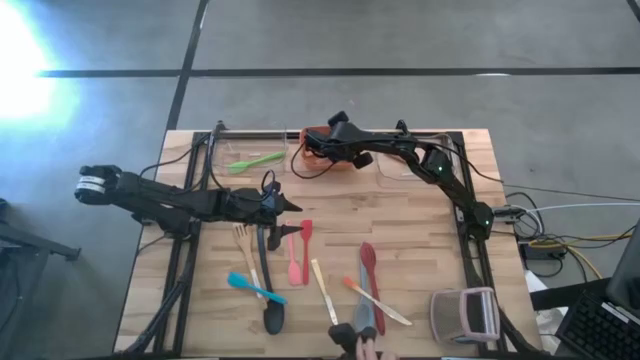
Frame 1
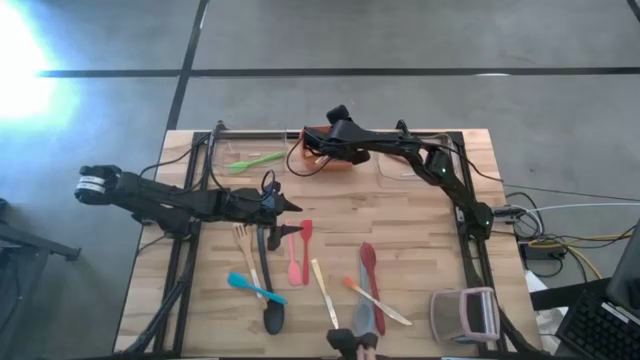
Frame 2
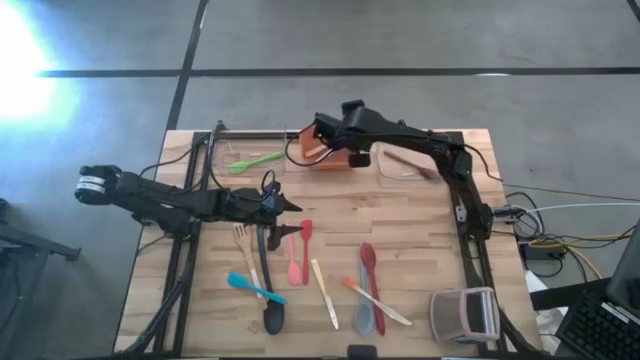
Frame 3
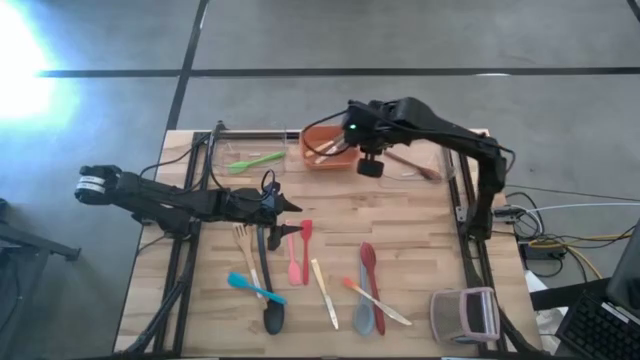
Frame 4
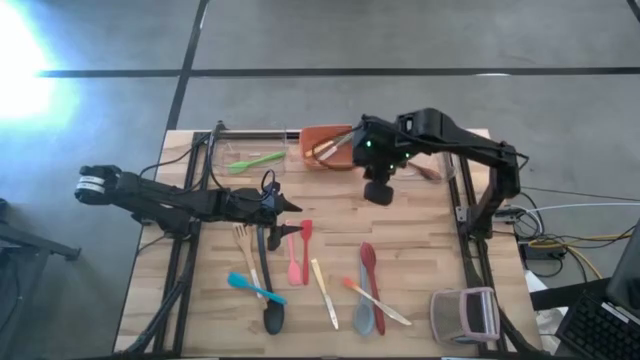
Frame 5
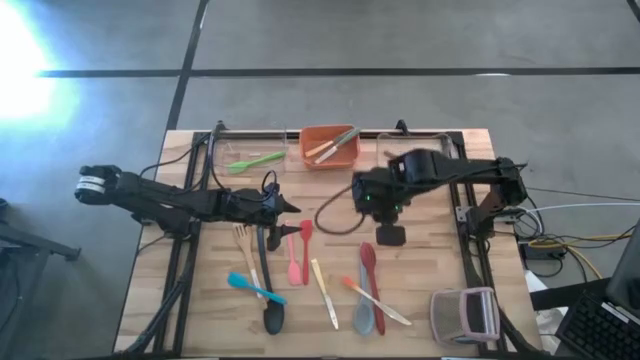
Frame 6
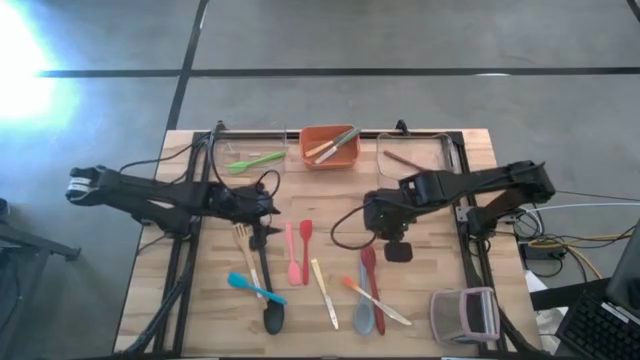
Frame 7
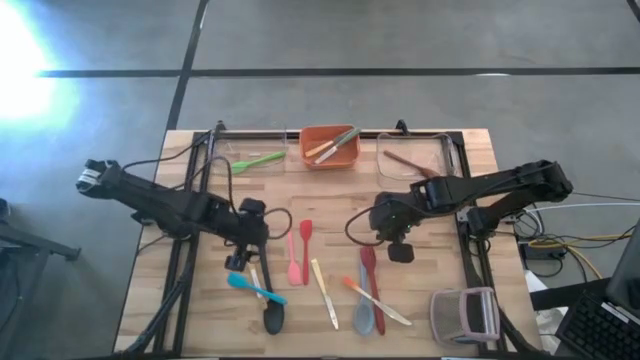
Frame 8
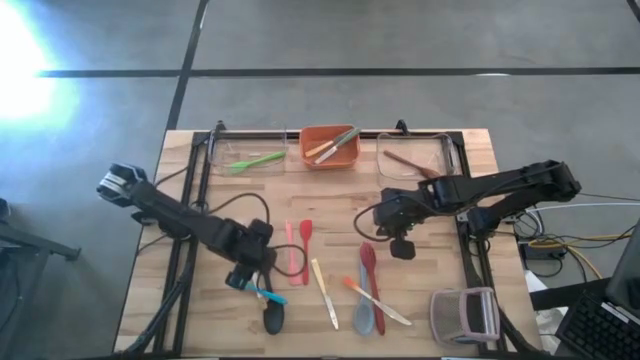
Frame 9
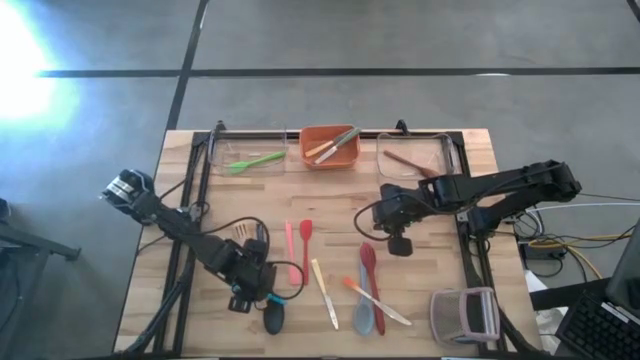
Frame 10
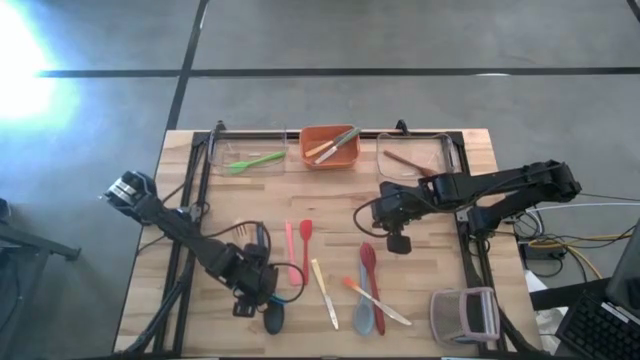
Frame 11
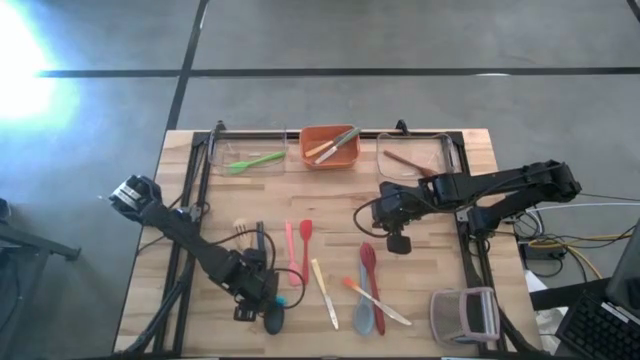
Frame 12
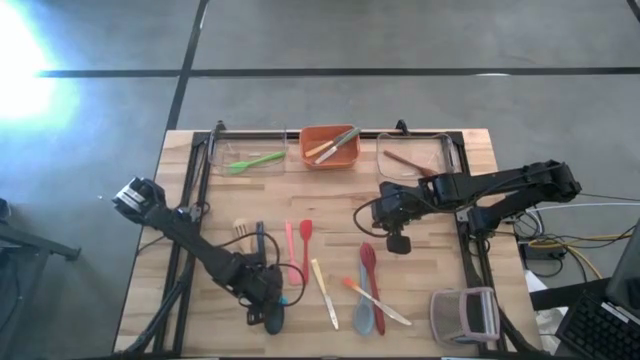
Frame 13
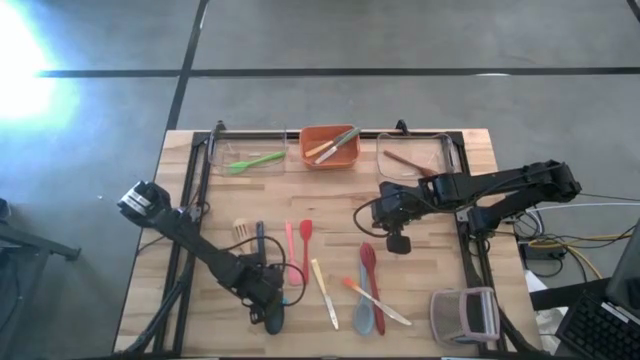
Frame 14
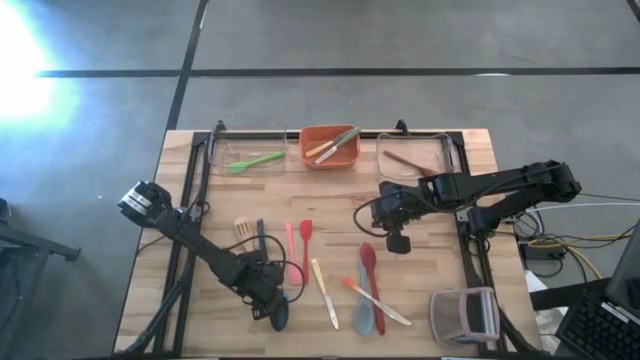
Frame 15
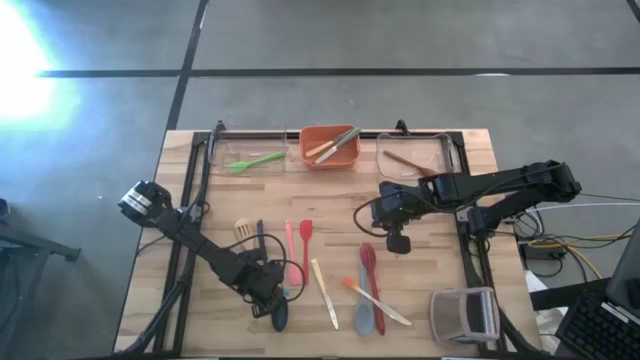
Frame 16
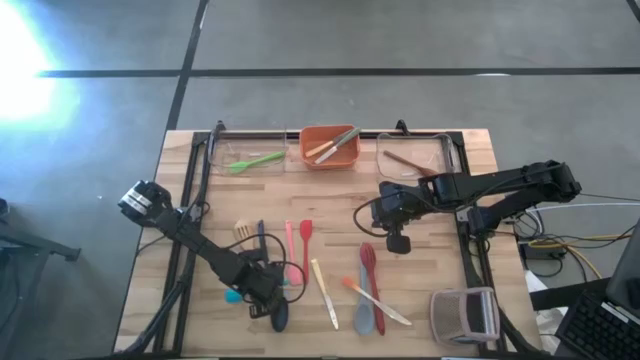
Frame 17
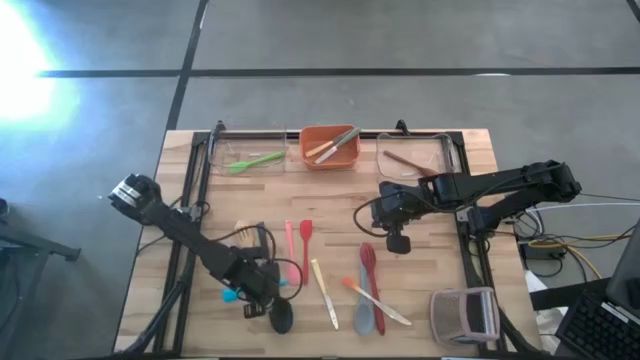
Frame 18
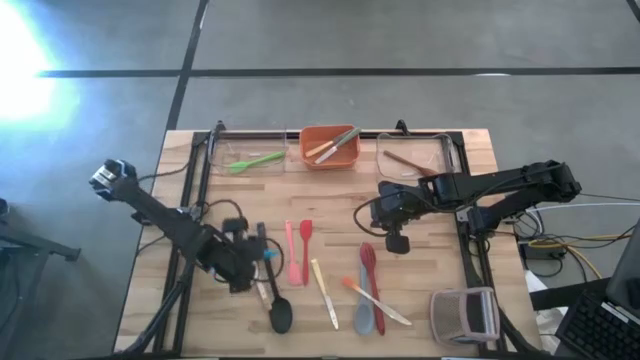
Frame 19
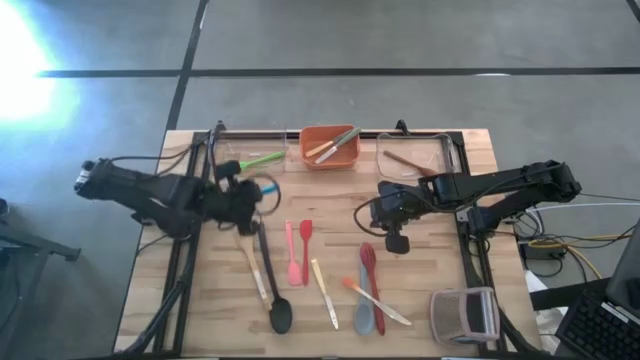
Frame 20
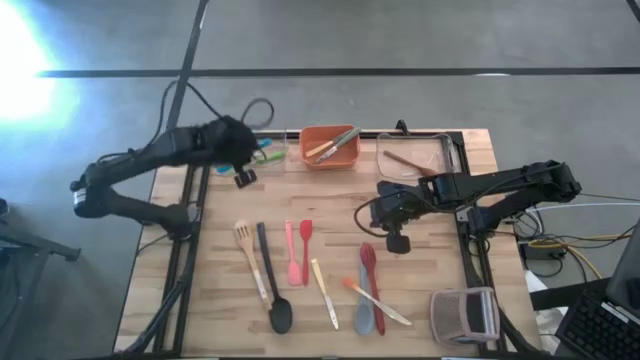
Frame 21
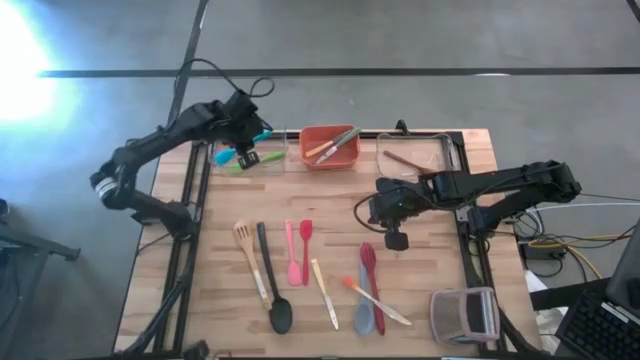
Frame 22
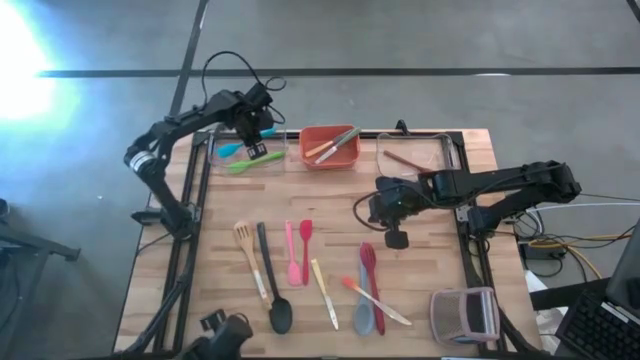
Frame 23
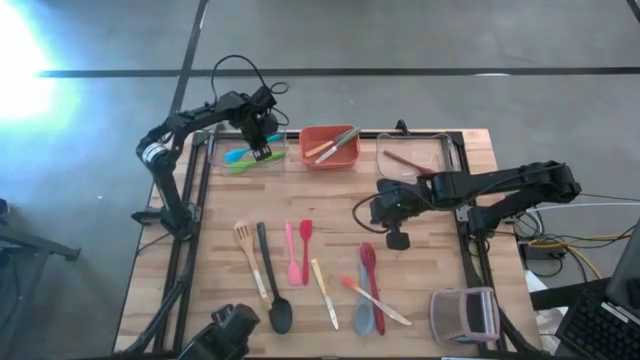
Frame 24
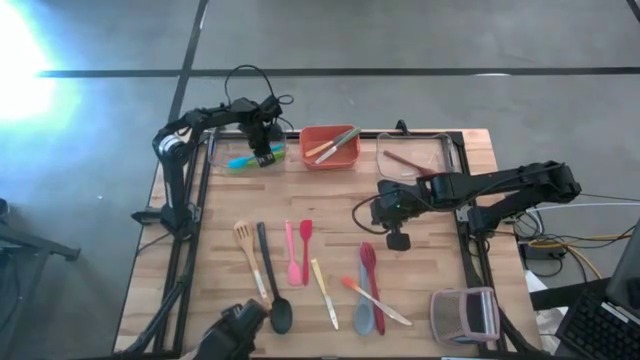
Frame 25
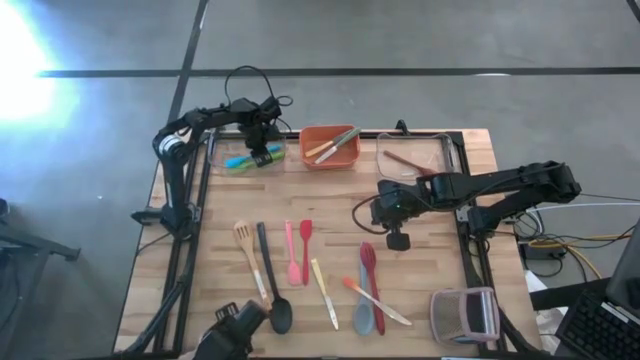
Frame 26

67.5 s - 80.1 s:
Task: Pick & Place Kitchen Items
Put the blue spatula into the left transparent bin

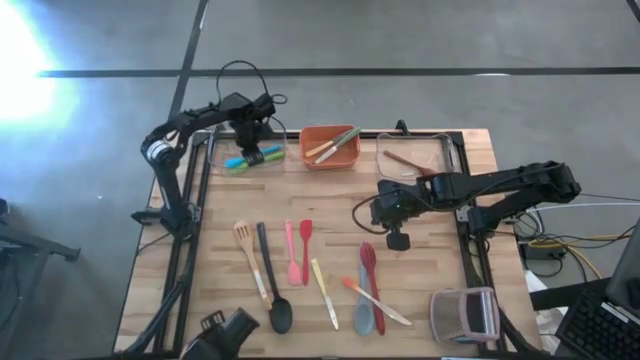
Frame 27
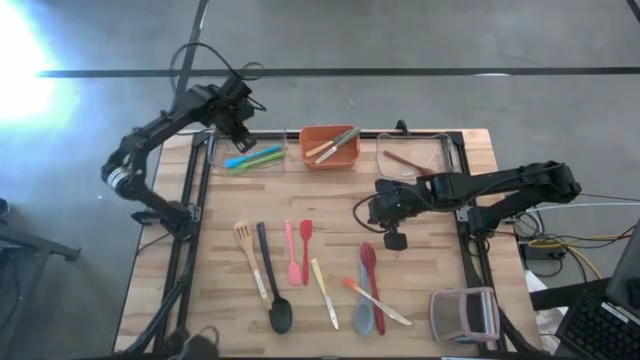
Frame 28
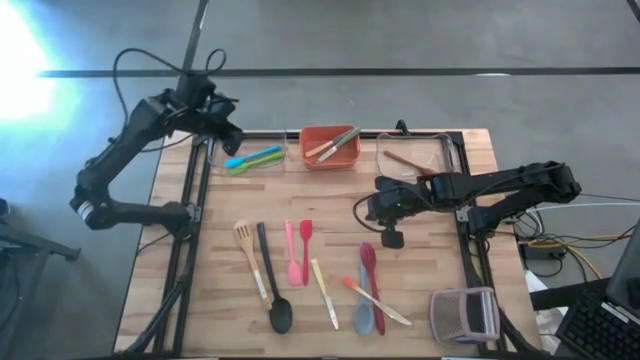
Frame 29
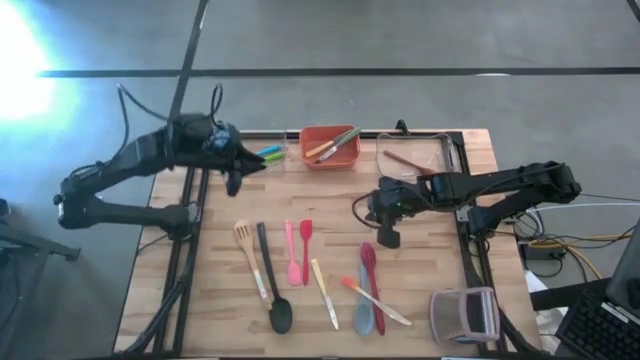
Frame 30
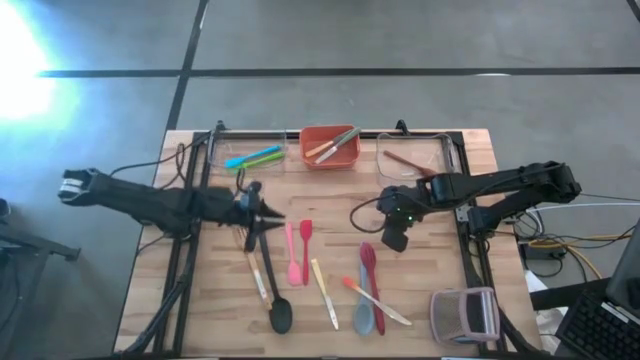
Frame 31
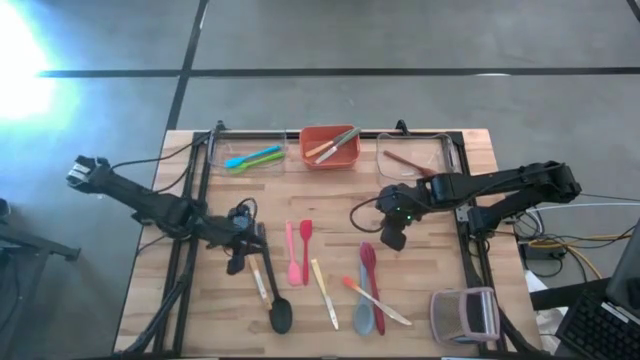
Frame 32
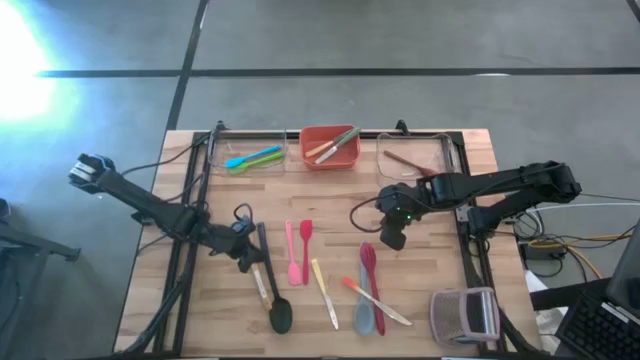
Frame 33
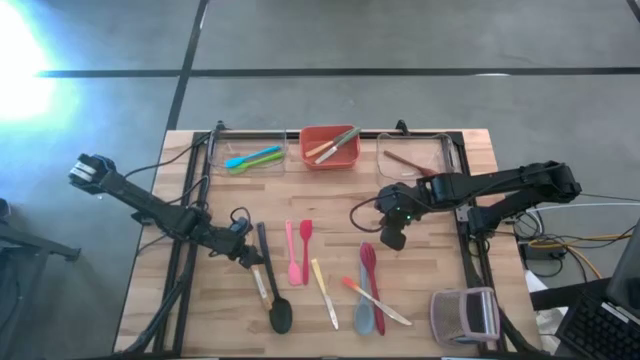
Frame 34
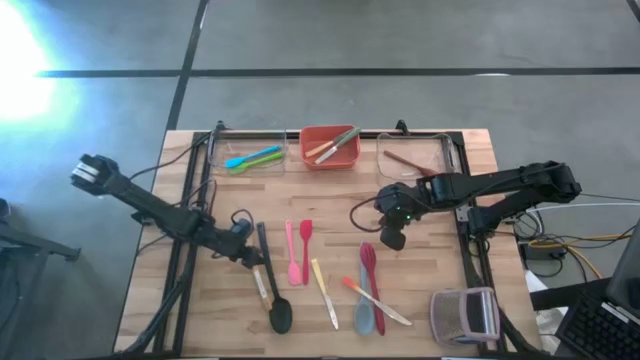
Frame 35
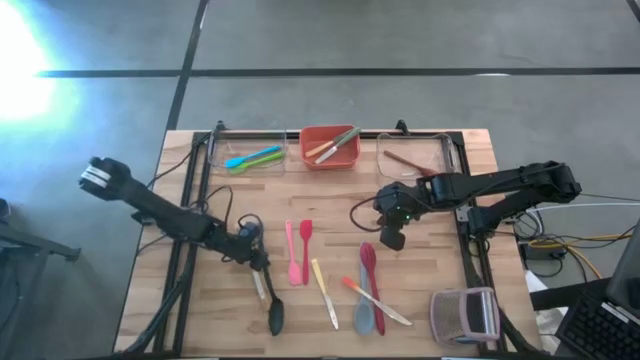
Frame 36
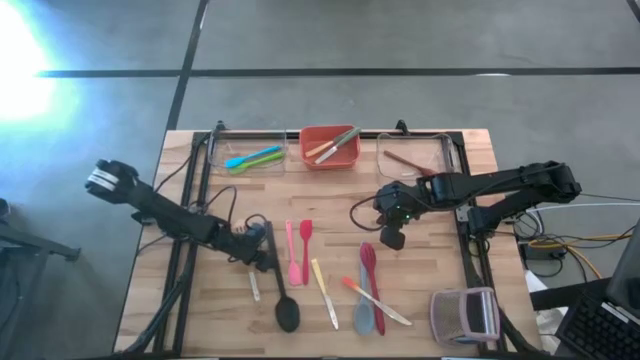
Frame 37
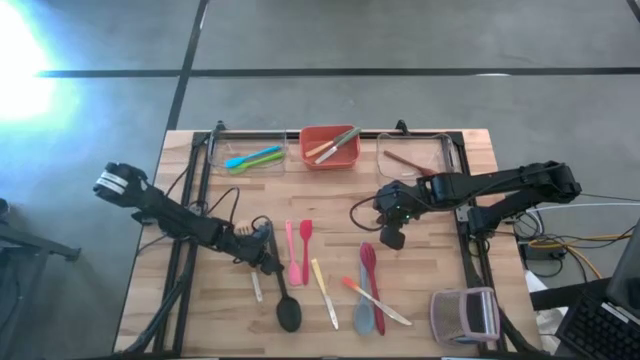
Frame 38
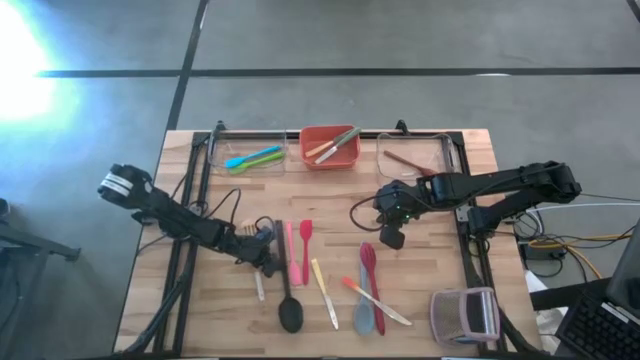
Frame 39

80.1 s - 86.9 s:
Put the black serving spoon into the right transparent bin

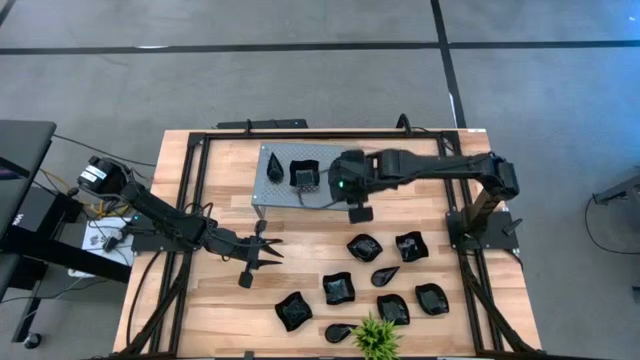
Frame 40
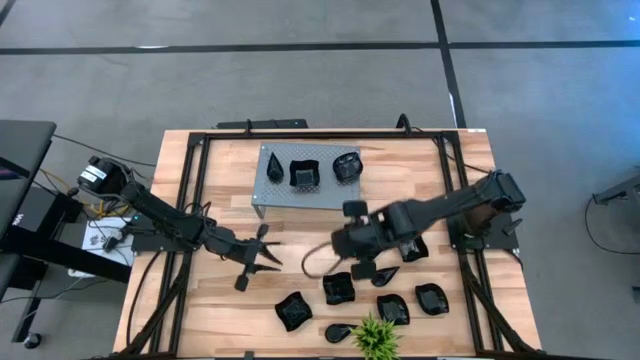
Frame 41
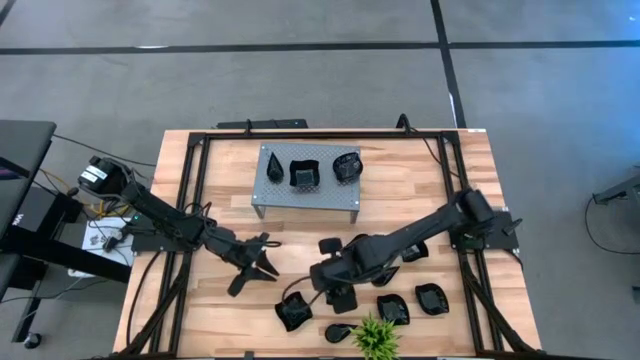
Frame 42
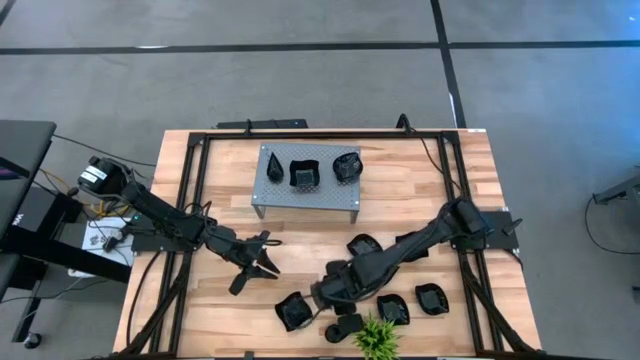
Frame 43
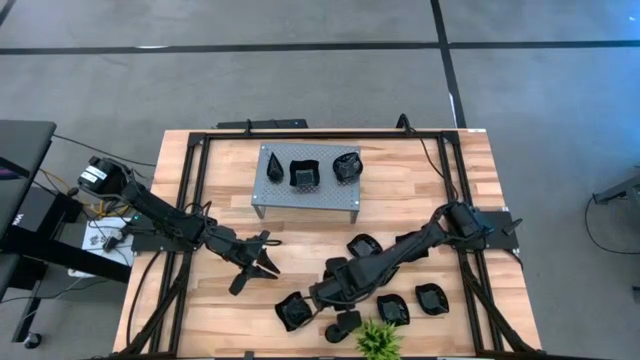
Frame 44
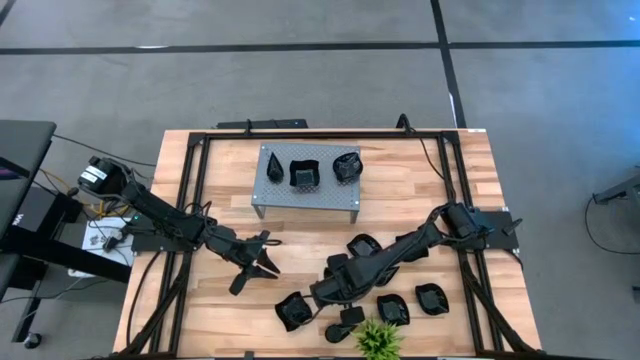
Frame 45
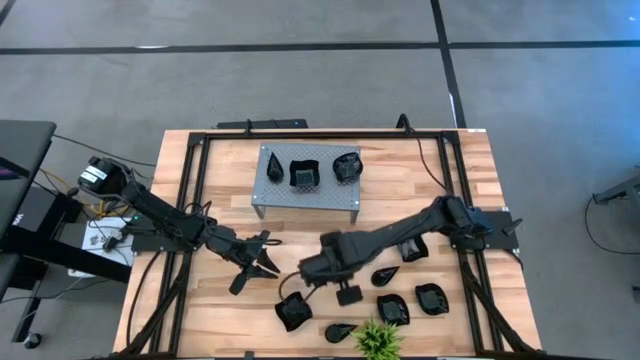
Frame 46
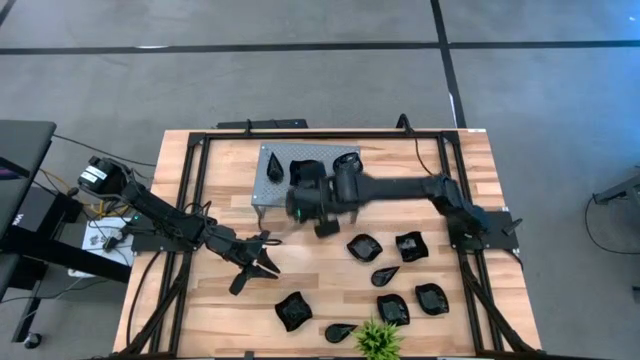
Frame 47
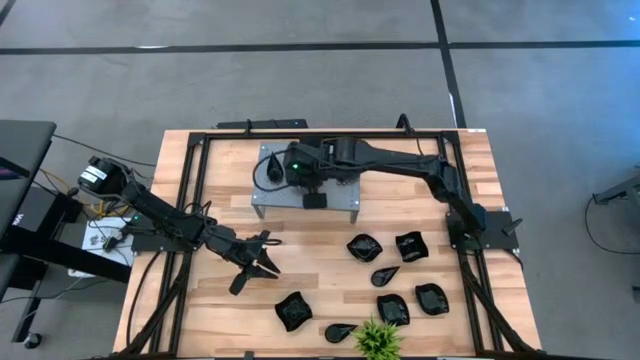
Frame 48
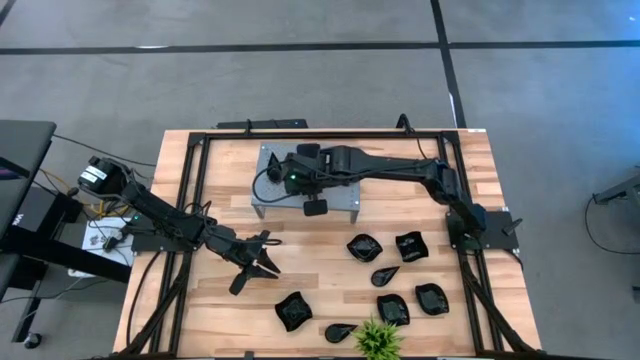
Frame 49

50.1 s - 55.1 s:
Task: Pick & Place Mini shaped plates
Stack the black distorted square plate on top of the black distorted square plate on the shelf
